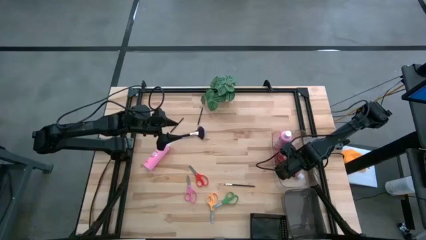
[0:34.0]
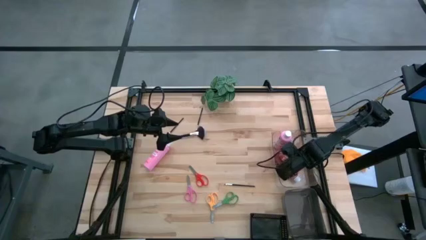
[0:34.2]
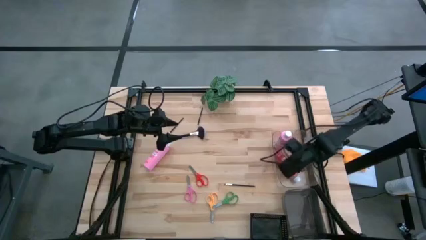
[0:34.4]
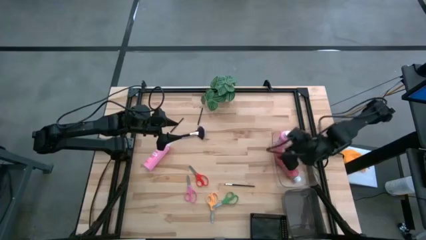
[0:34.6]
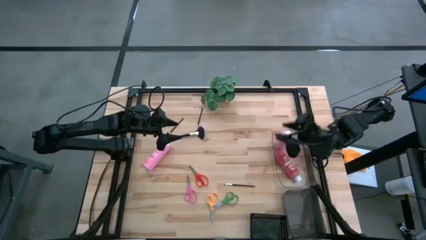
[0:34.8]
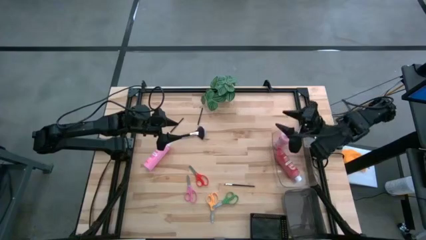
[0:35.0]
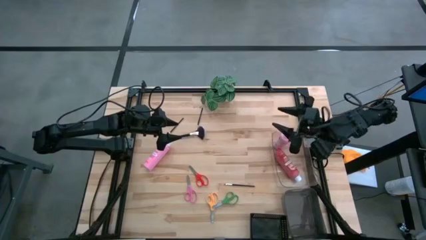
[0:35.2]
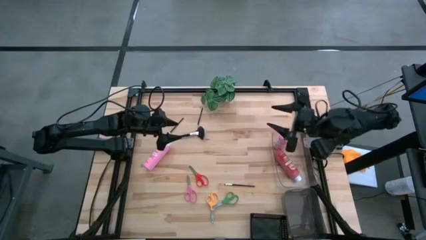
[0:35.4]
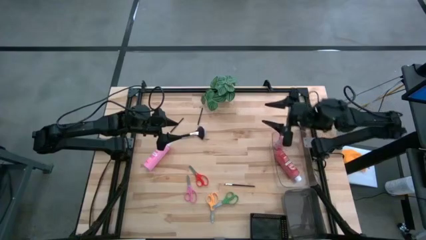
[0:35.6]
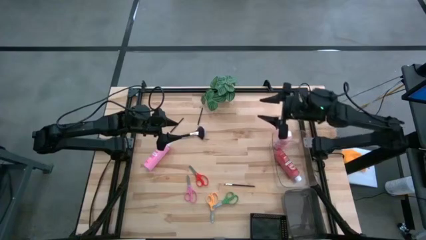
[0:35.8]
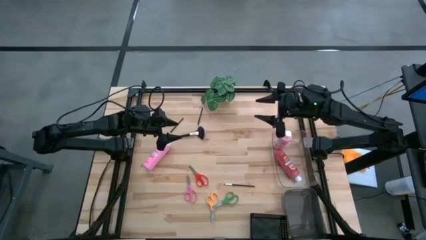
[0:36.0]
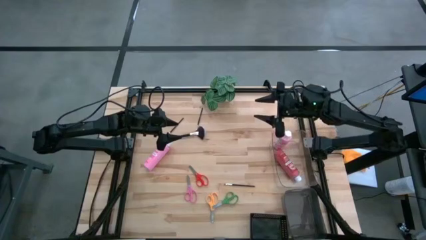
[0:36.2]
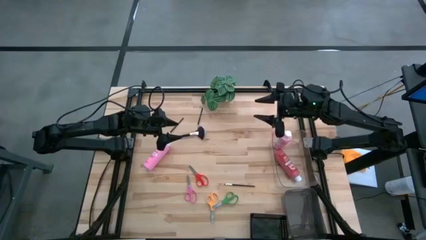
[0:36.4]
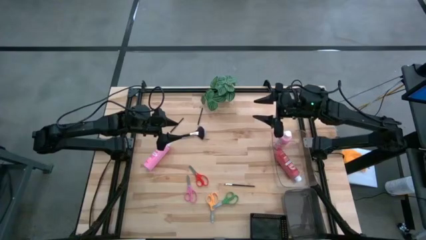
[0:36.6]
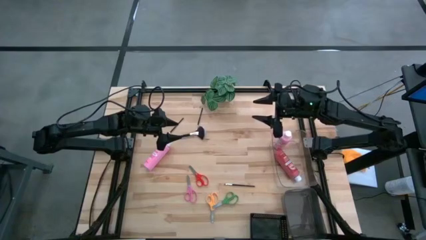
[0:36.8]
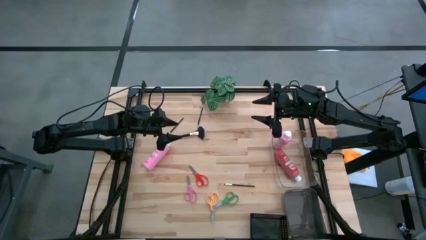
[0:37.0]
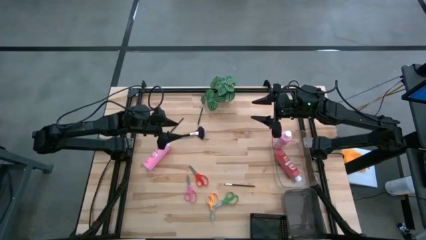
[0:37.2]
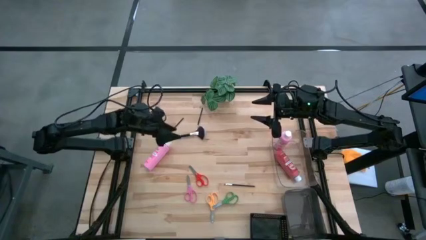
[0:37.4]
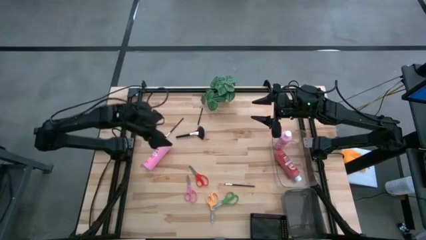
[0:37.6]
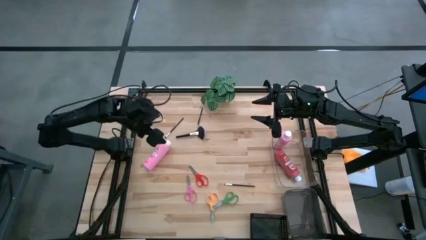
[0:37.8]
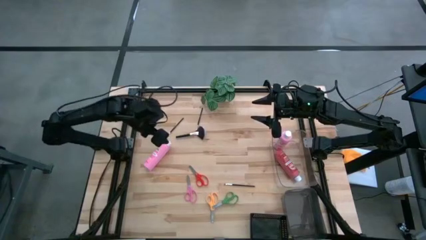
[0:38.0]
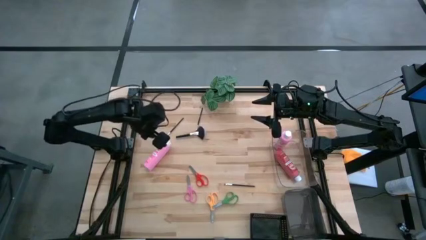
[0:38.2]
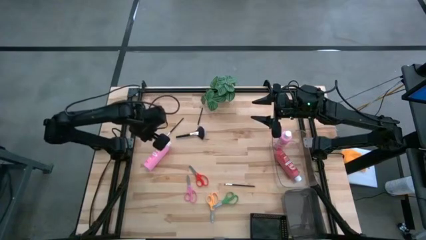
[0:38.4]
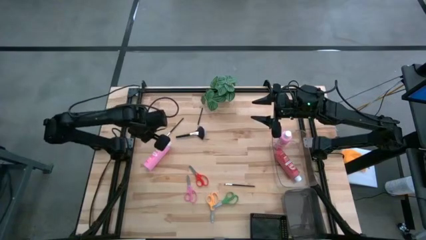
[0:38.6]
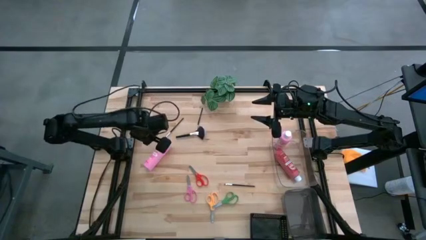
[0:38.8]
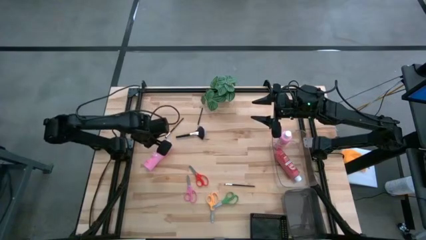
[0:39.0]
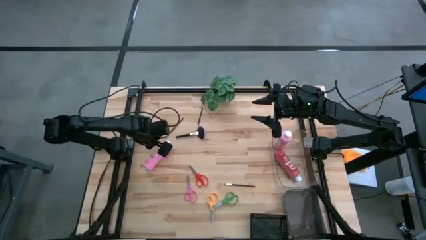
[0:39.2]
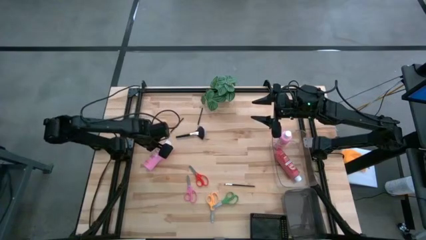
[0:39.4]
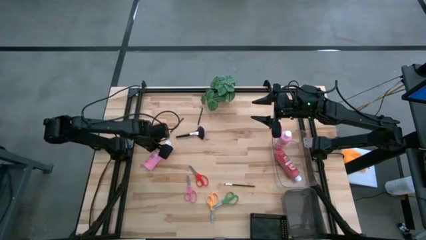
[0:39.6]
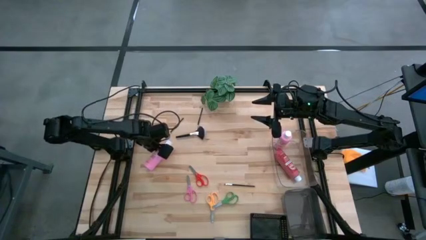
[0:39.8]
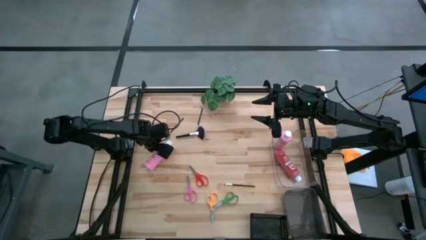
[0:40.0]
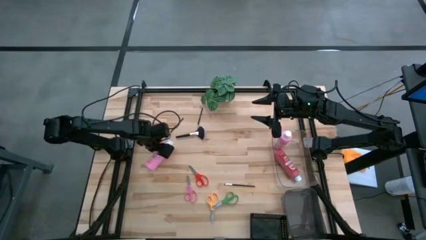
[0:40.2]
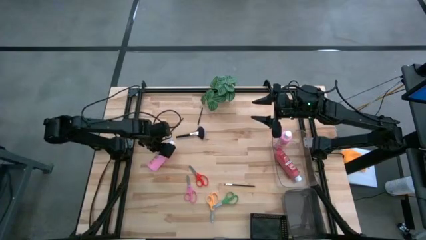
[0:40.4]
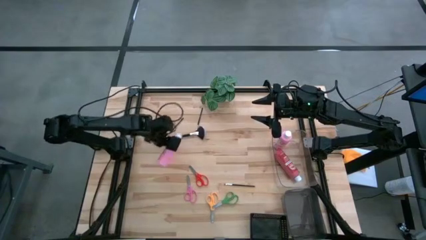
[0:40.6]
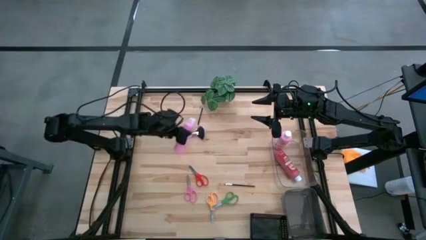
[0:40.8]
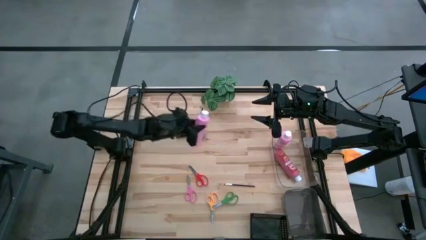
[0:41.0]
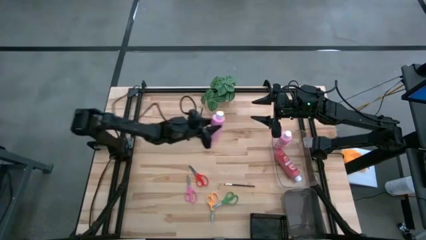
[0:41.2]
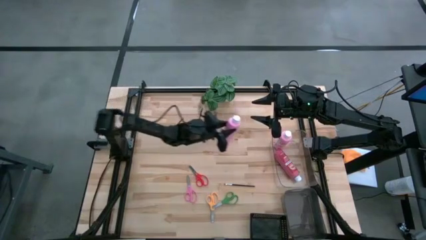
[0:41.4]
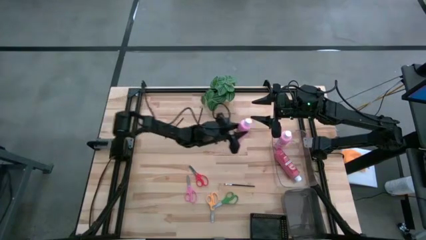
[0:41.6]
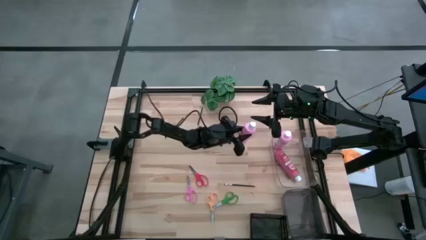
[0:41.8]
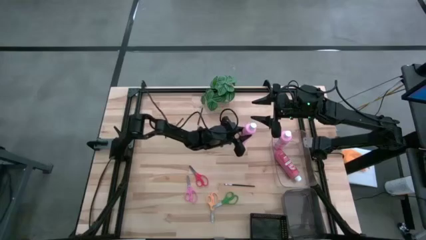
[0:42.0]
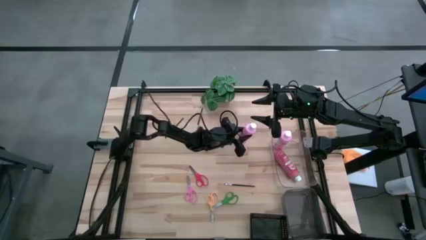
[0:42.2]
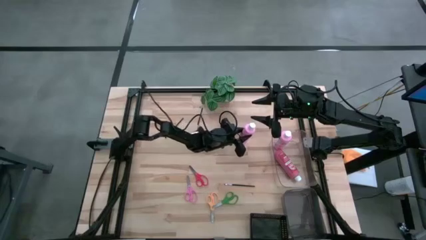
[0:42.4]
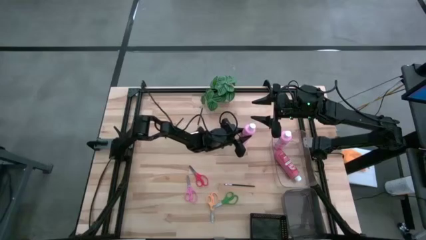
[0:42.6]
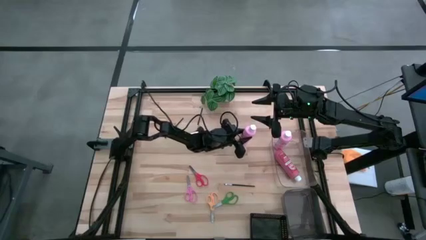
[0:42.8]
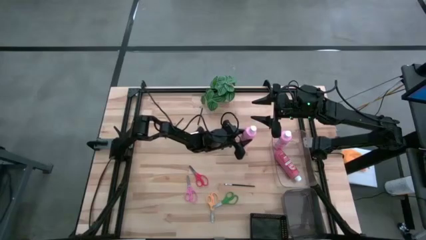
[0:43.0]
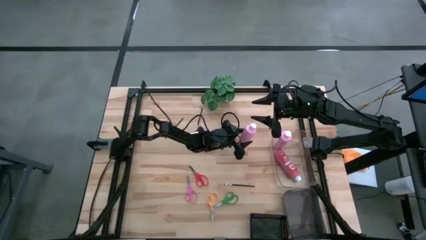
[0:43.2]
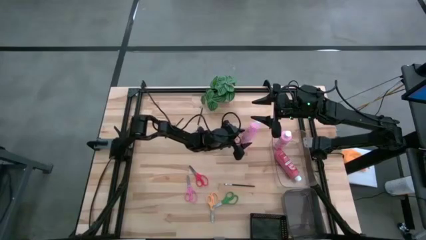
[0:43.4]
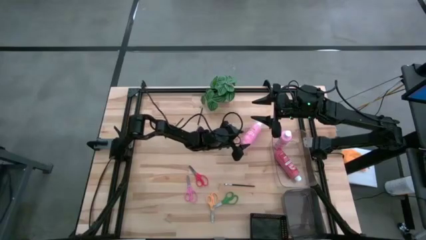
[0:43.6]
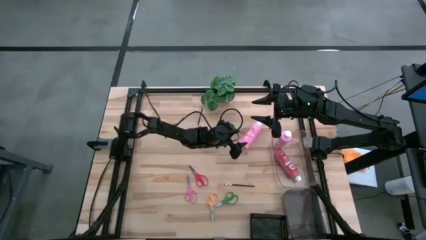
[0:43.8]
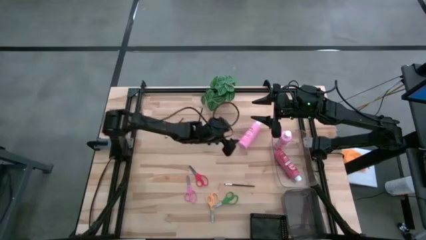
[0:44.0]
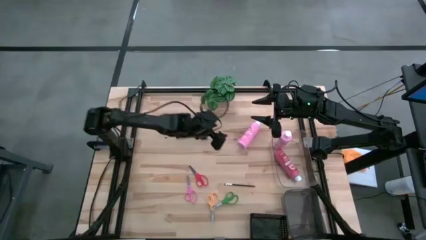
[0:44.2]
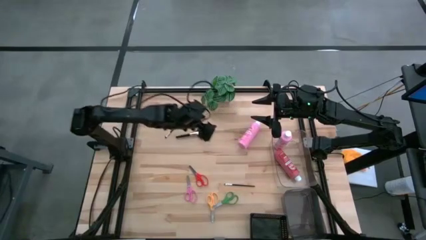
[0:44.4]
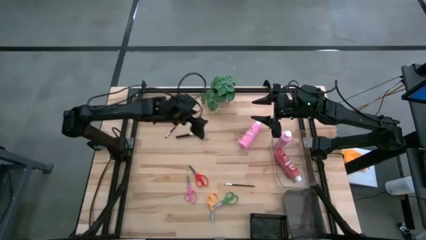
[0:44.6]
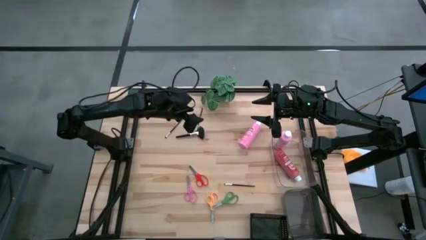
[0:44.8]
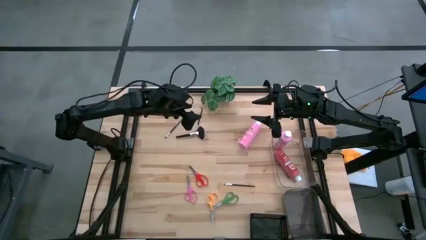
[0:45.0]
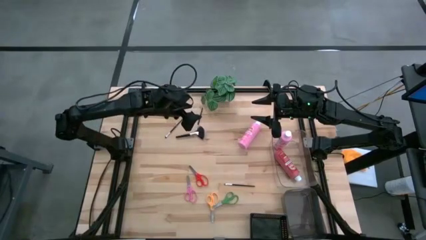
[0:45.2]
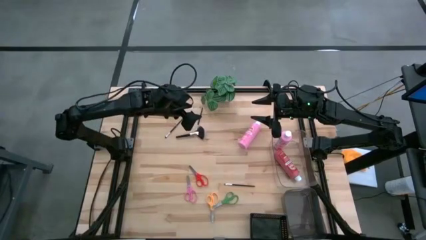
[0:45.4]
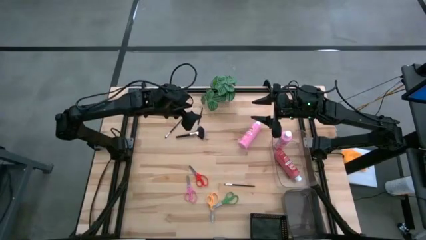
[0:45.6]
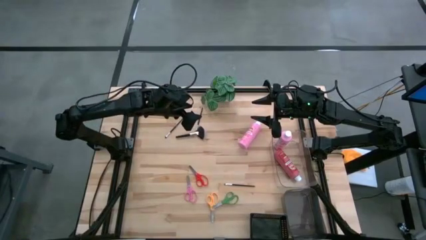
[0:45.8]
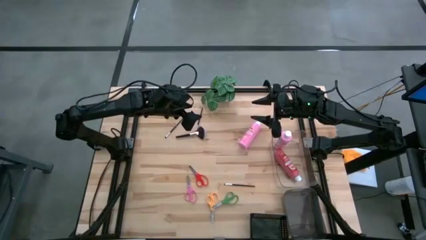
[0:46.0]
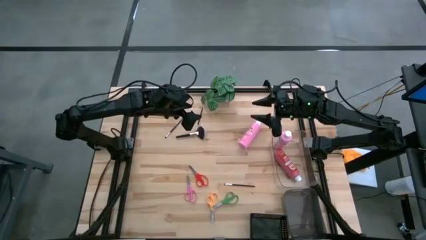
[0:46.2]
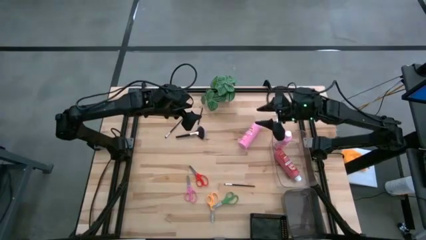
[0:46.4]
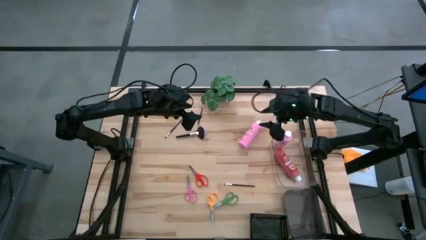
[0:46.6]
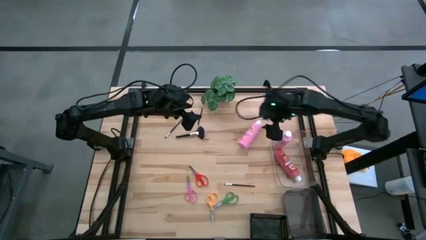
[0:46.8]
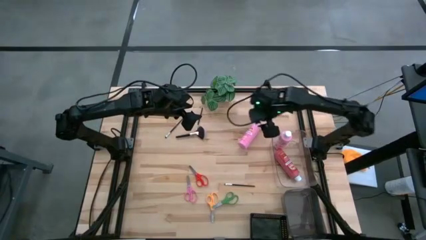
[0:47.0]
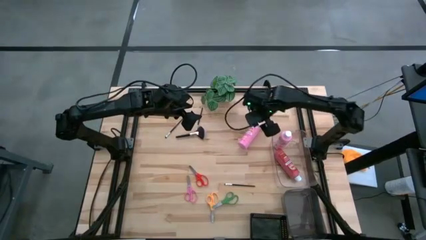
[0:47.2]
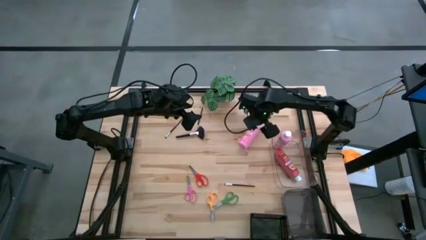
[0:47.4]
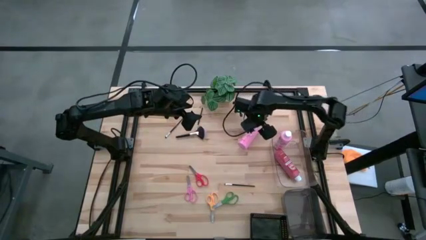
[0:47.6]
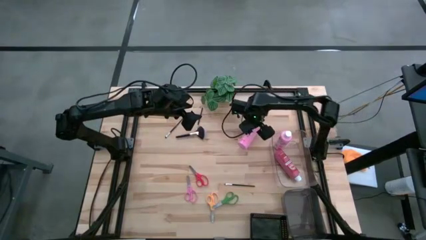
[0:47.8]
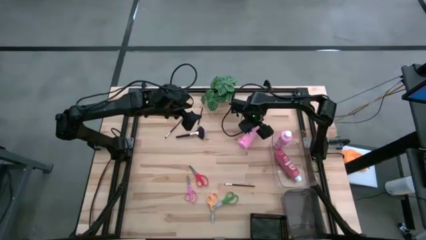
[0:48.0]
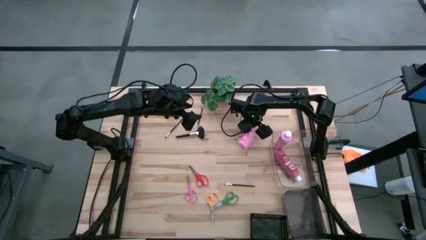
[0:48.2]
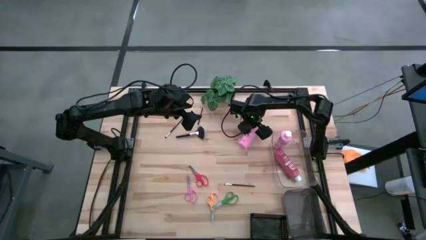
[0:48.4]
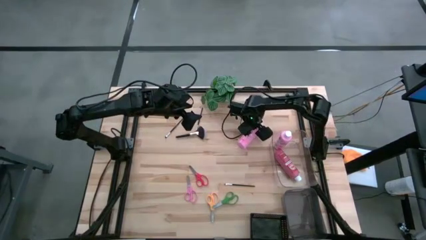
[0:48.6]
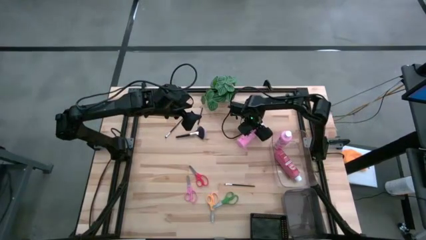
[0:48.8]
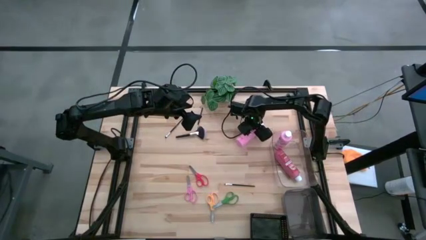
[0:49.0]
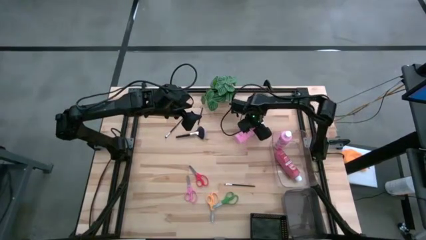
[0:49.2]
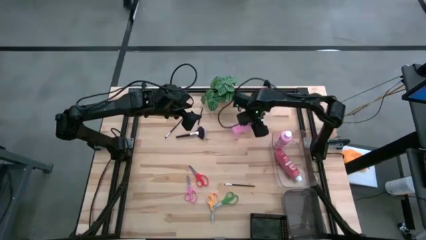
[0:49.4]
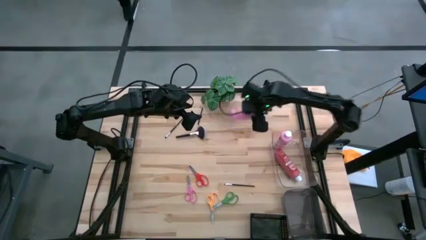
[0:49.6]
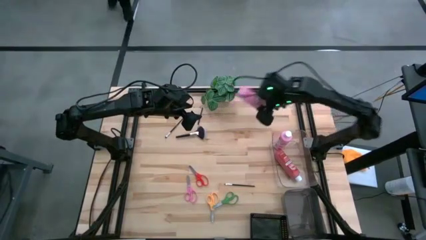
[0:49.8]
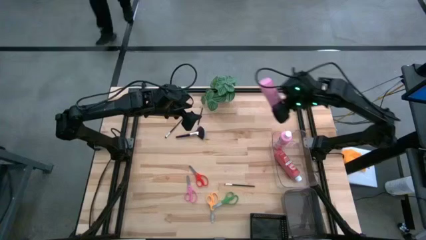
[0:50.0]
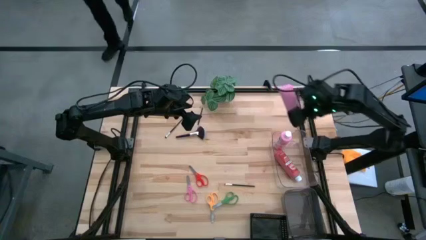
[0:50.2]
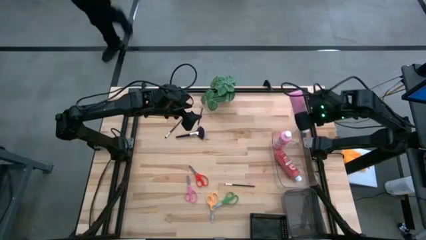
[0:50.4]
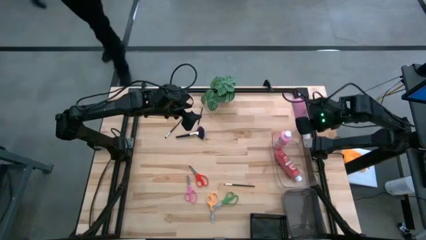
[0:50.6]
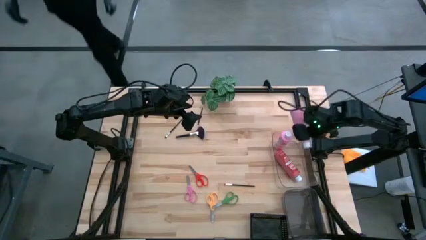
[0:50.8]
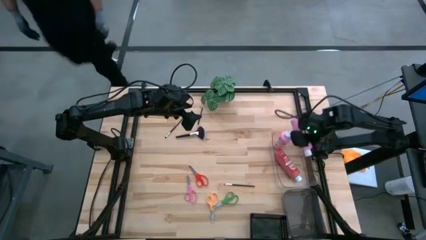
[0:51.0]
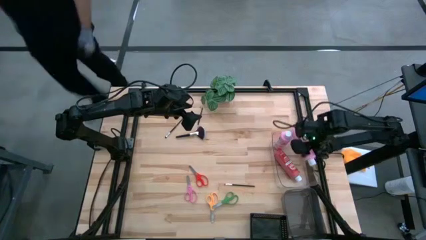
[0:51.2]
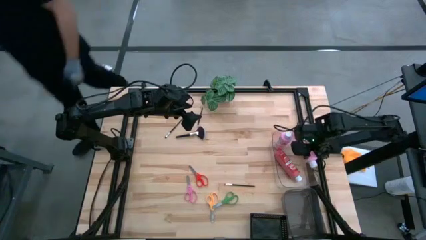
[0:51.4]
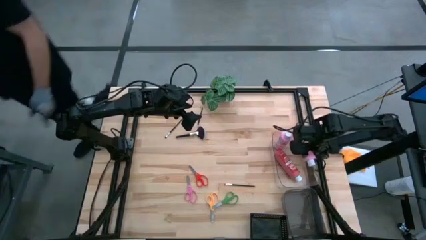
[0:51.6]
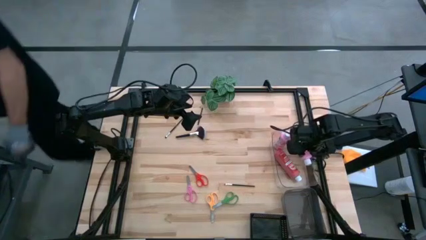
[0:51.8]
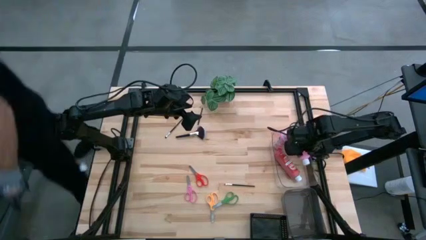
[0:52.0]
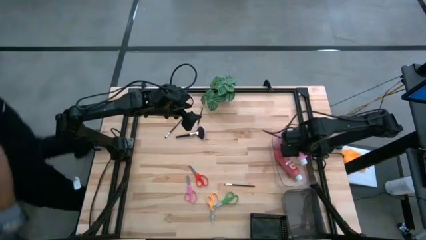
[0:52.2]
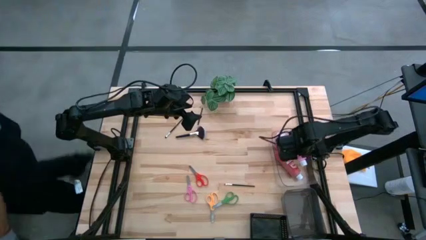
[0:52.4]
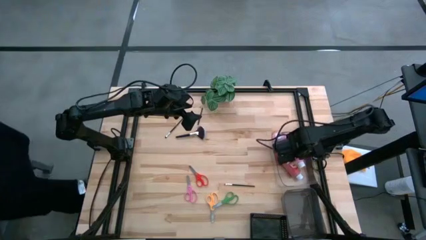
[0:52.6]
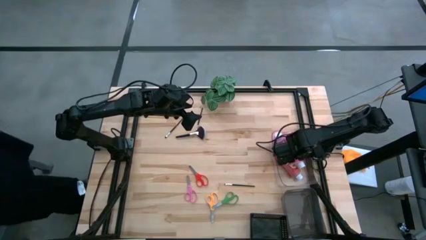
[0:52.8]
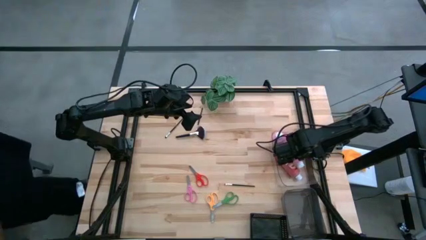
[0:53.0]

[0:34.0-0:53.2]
Task: Pick & Place Paint Supplies
Put the pink paint bottle into the transparent bin
